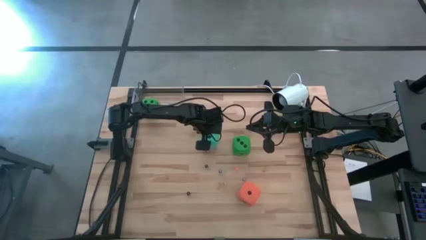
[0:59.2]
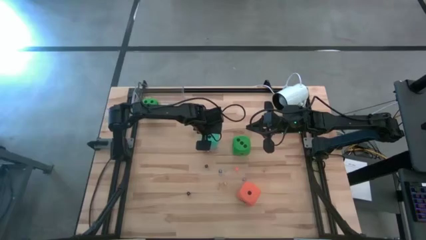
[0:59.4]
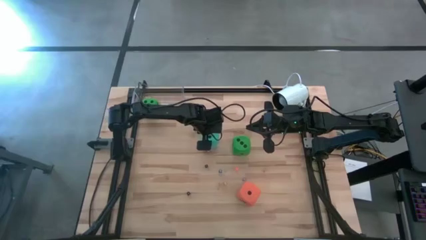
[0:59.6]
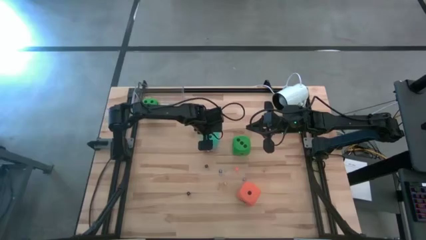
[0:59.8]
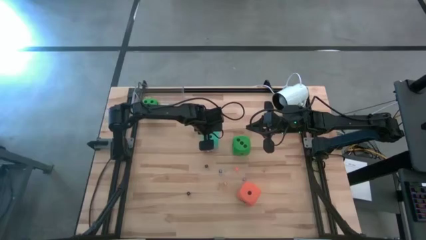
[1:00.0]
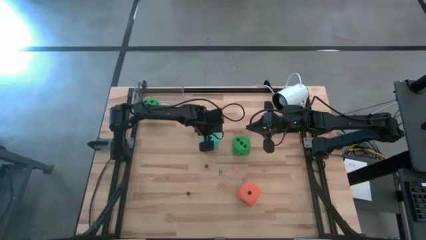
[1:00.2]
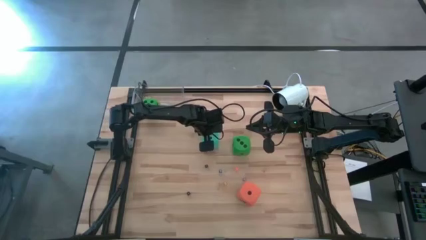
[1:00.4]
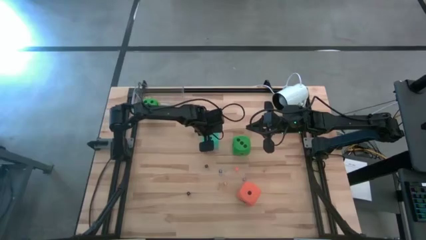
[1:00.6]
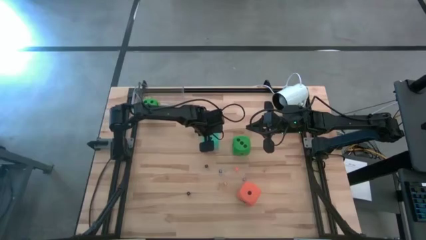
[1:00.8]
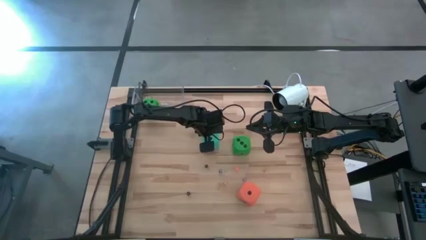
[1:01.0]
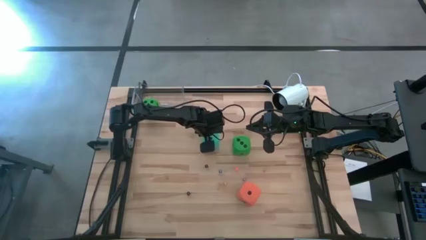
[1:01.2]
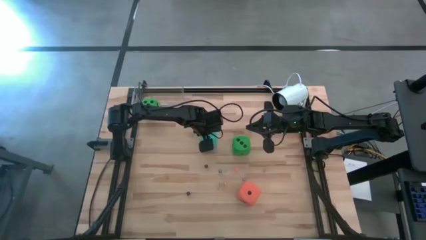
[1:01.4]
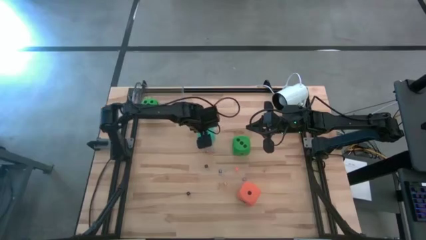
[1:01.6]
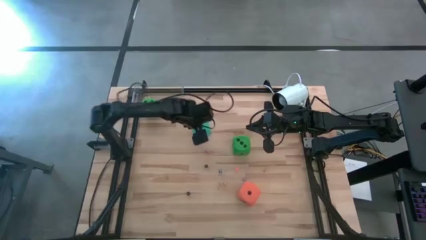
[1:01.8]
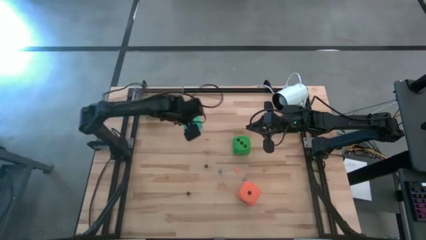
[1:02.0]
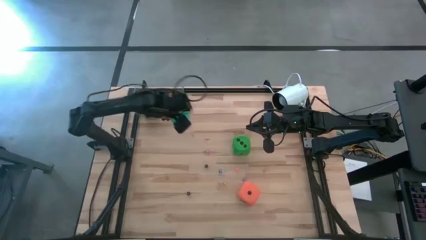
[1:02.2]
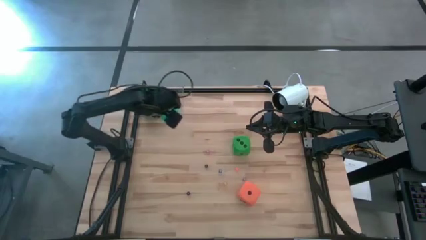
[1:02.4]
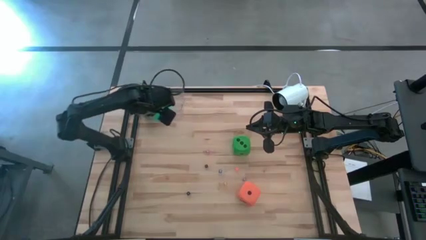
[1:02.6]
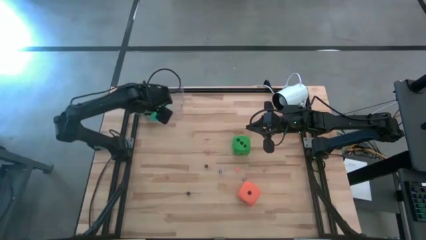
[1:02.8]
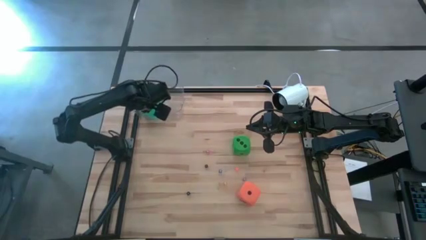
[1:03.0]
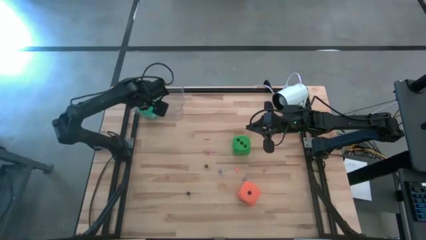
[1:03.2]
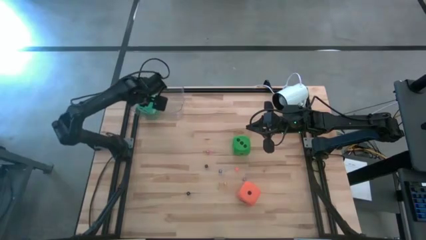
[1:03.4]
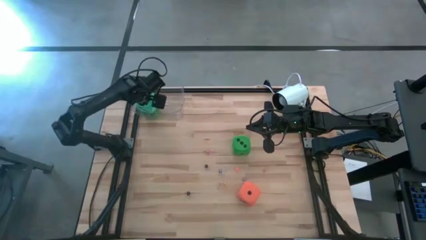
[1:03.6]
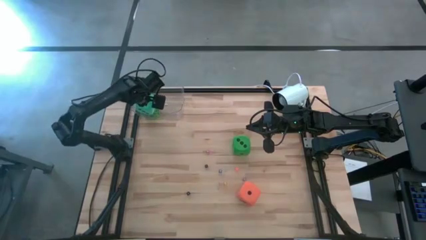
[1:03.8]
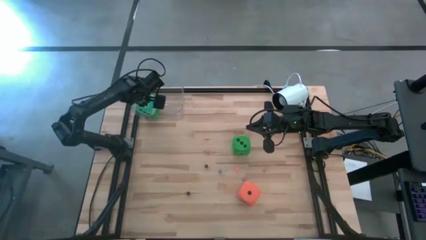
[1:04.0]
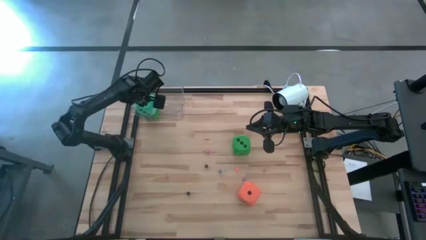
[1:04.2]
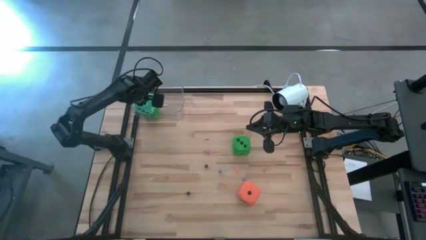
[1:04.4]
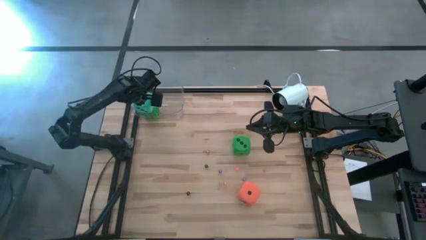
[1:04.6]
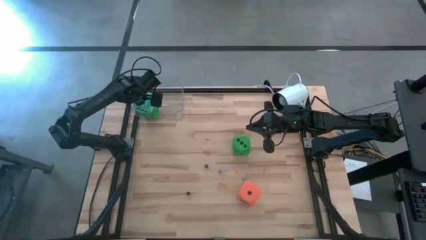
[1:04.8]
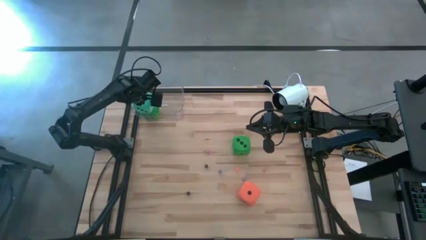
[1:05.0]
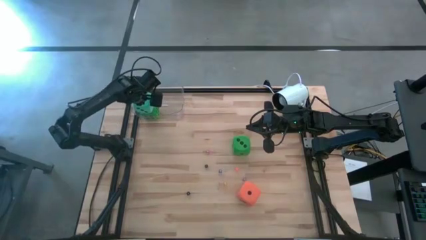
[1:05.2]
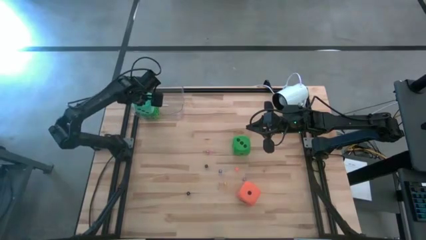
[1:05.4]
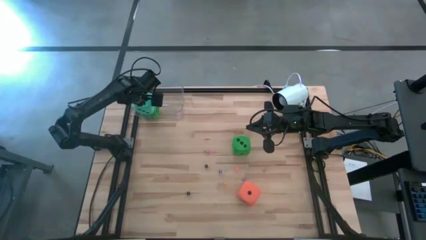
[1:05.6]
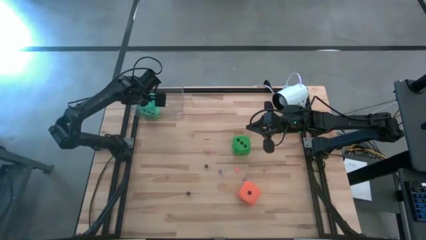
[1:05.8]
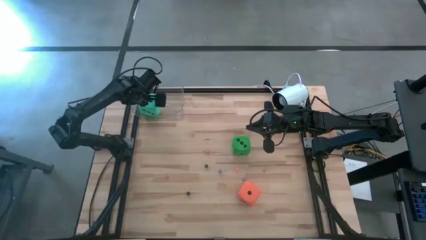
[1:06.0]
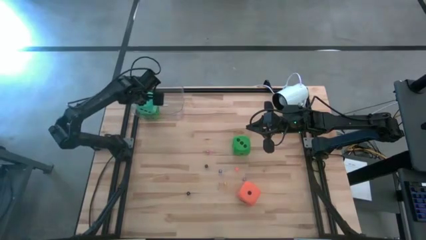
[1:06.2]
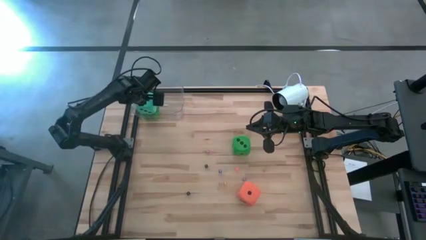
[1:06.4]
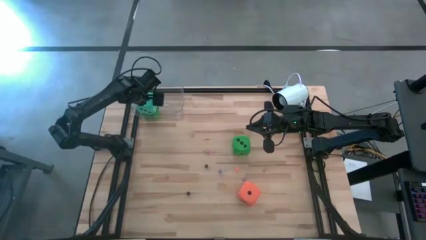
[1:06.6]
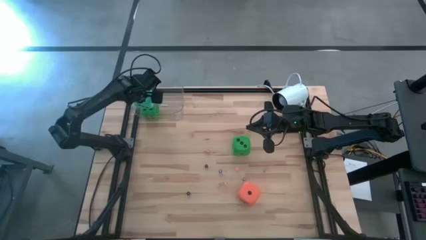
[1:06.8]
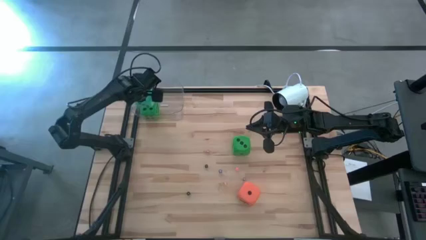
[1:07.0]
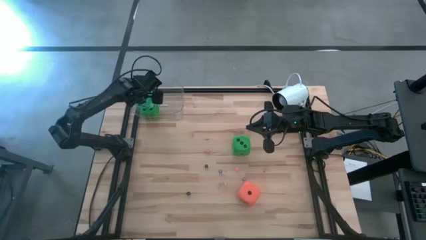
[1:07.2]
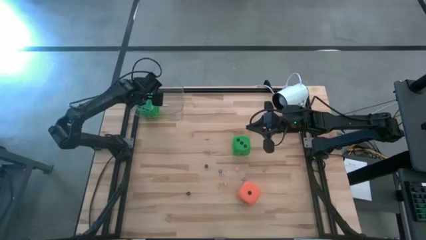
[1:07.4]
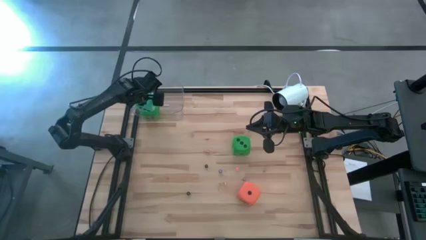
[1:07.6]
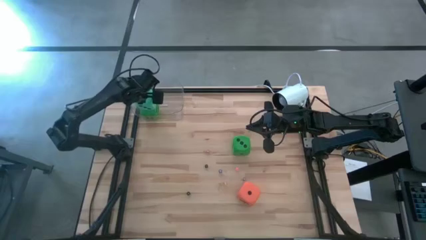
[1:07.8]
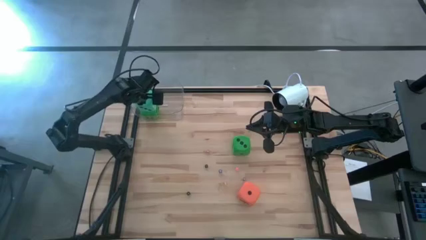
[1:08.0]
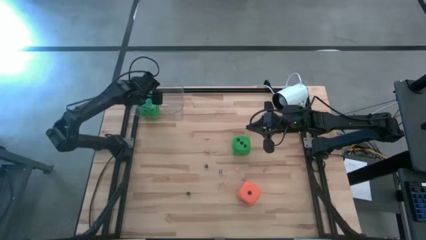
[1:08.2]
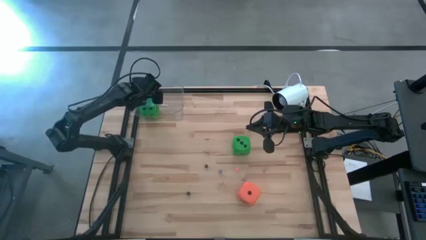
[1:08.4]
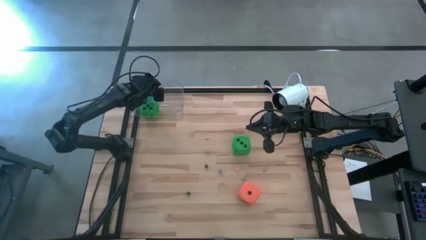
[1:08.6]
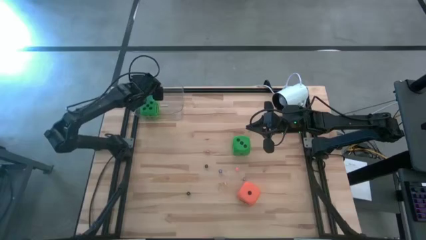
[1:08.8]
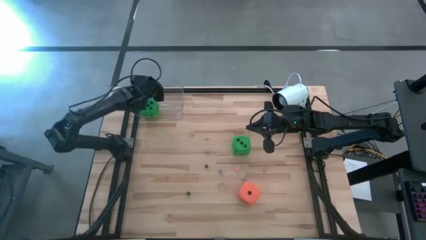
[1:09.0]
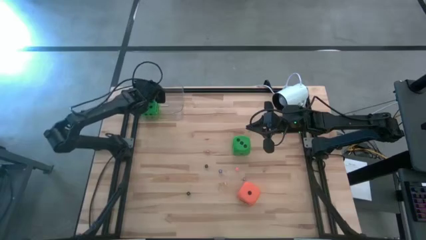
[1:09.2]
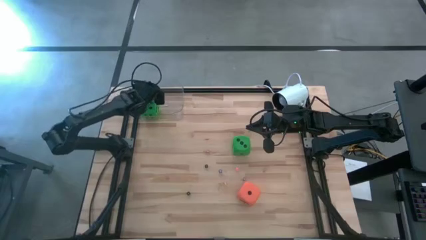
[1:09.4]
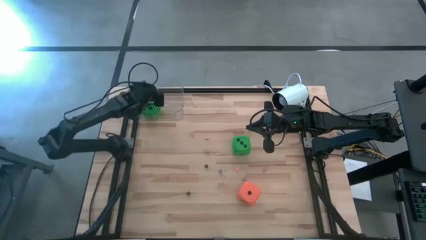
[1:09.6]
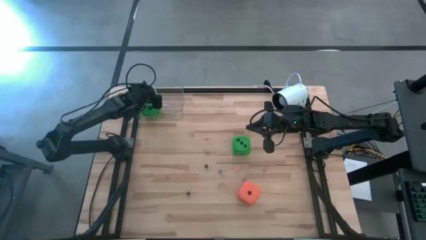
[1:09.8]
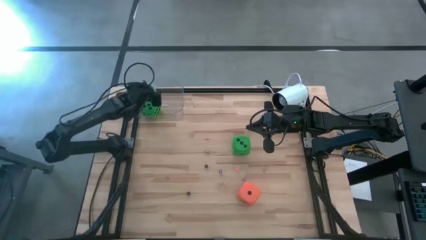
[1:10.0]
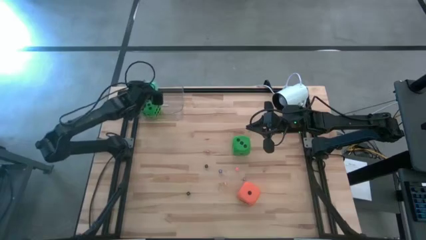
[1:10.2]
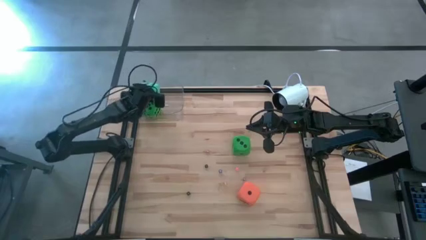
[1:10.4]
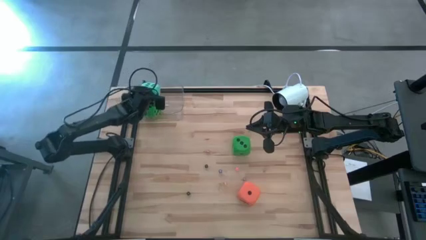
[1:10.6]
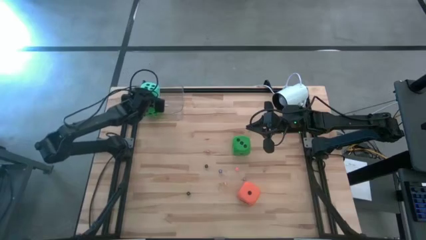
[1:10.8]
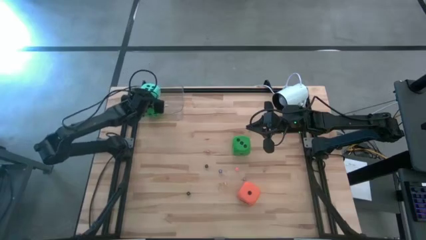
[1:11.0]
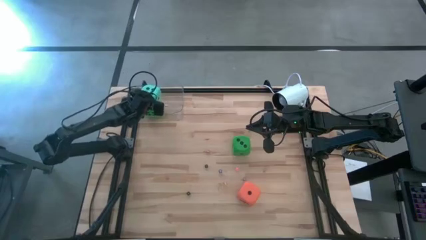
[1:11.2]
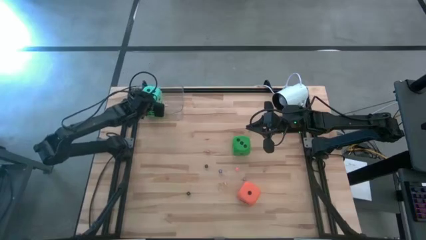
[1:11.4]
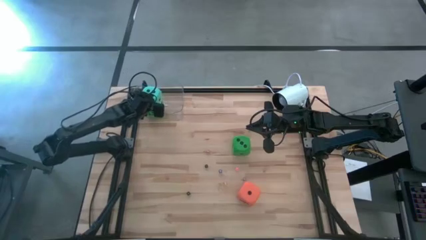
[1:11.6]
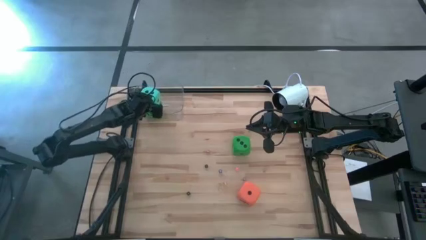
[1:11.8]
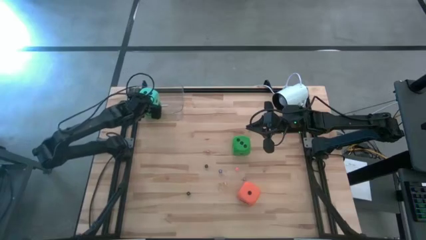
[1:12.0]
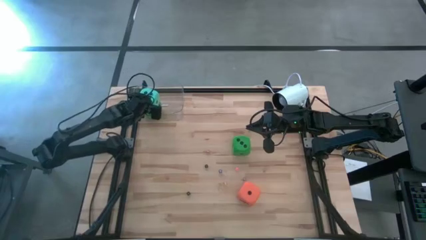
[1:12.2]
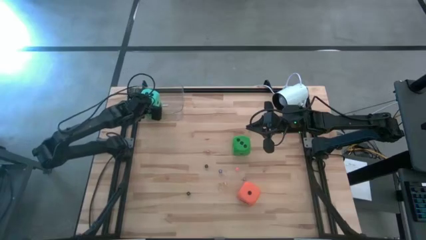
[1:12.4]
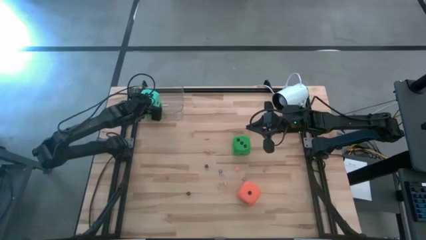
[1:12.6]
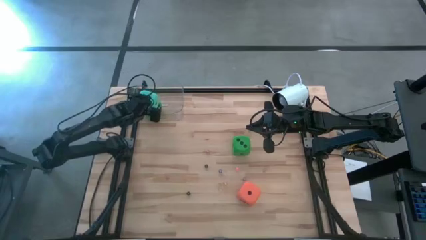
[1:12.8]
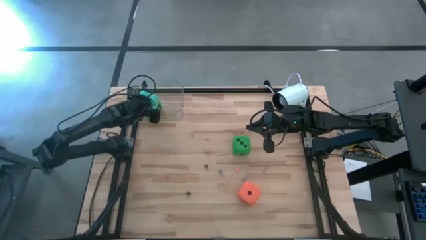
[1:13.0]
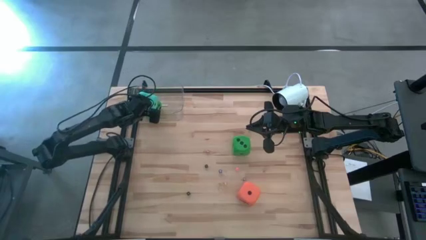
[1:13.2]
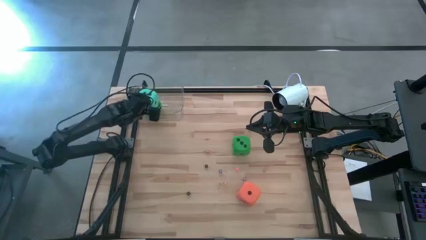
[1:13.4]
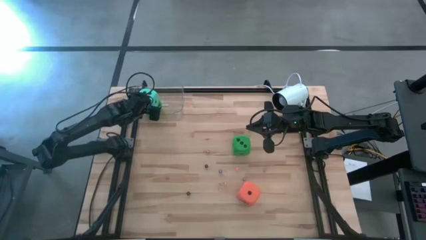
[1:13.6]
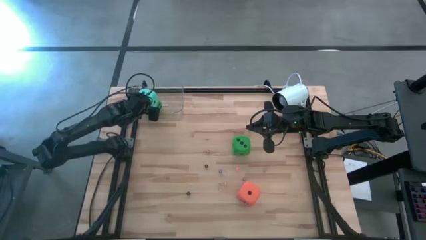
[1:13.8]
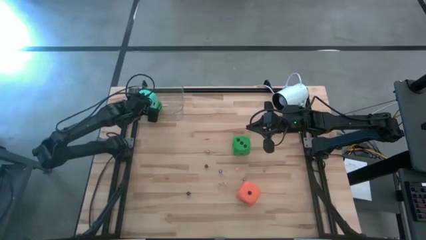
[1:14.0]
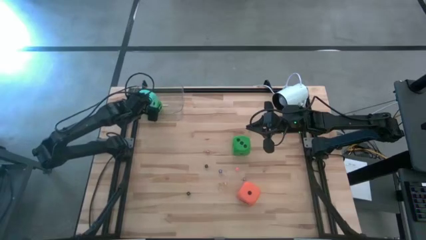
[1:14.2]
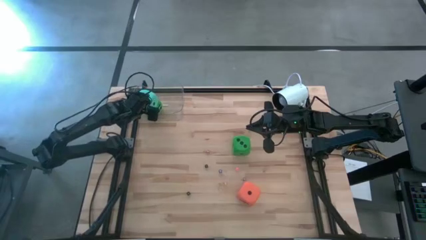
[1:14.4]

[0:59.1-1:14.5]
Task: Pick & Place Dice
Put the large blue die into the transparent bin
